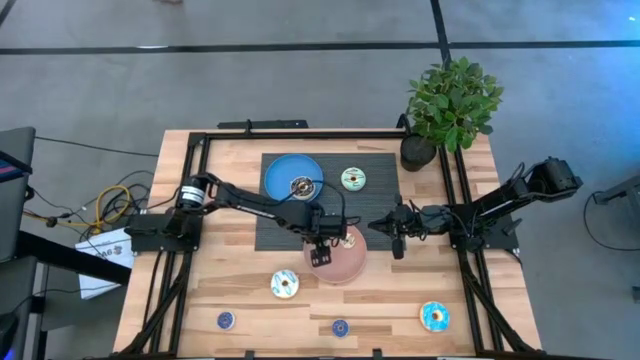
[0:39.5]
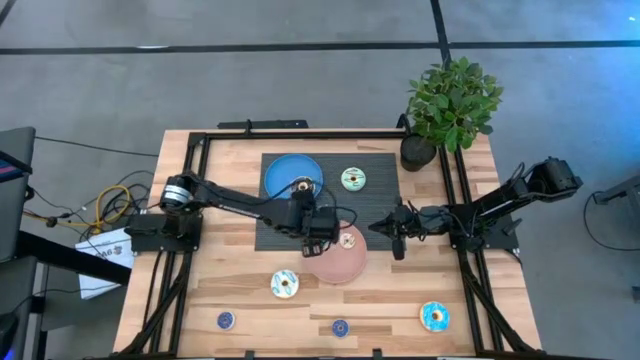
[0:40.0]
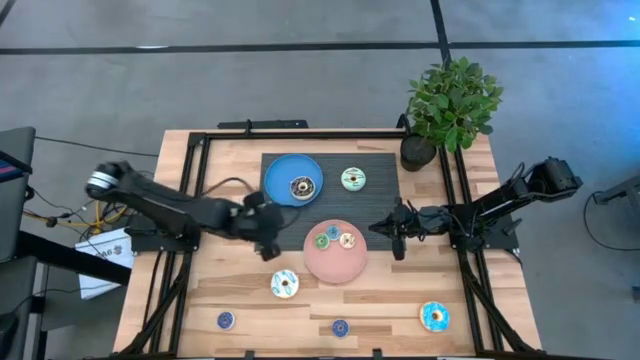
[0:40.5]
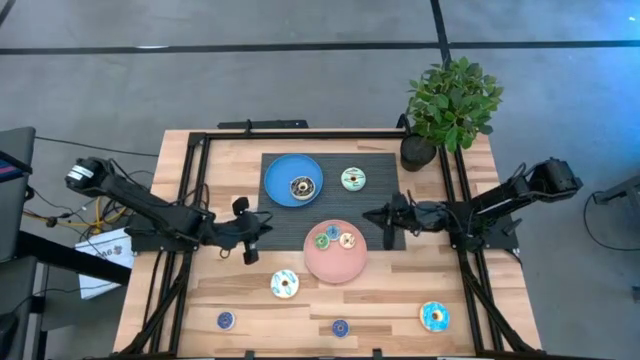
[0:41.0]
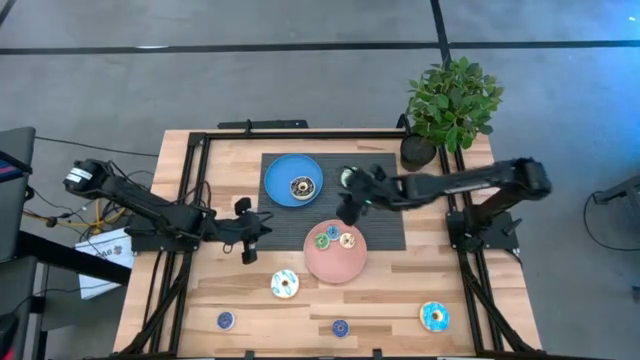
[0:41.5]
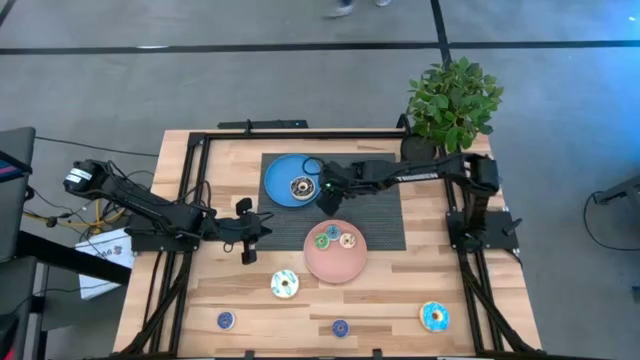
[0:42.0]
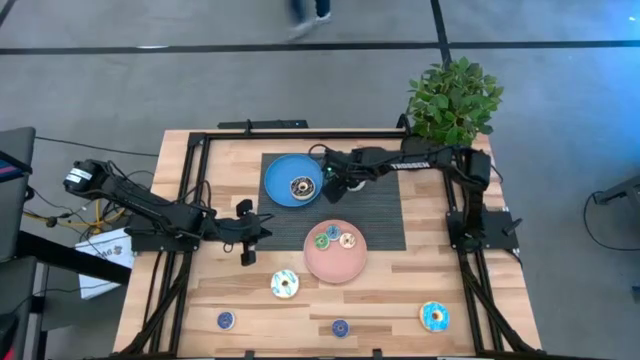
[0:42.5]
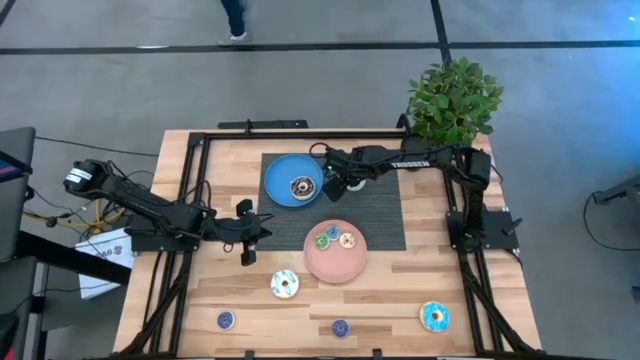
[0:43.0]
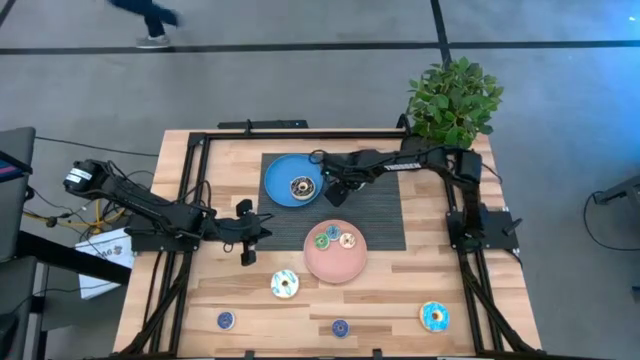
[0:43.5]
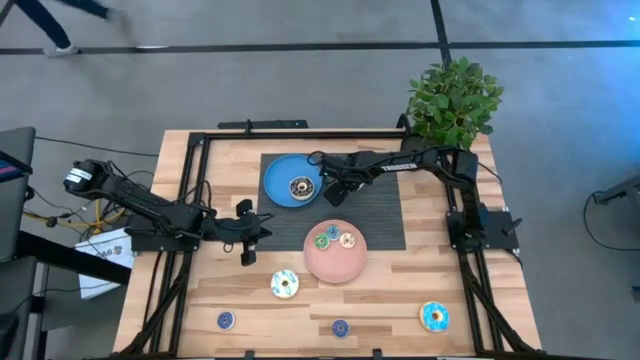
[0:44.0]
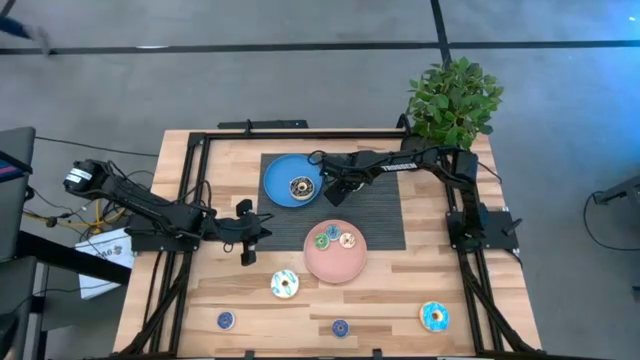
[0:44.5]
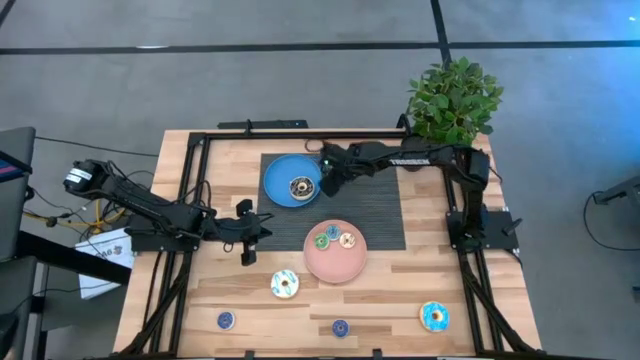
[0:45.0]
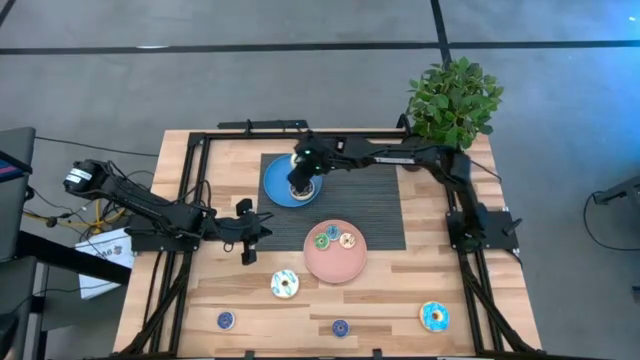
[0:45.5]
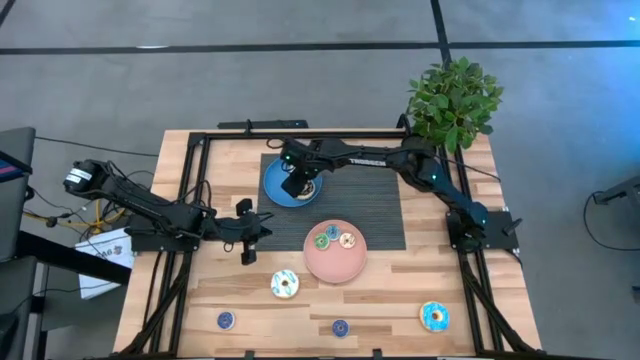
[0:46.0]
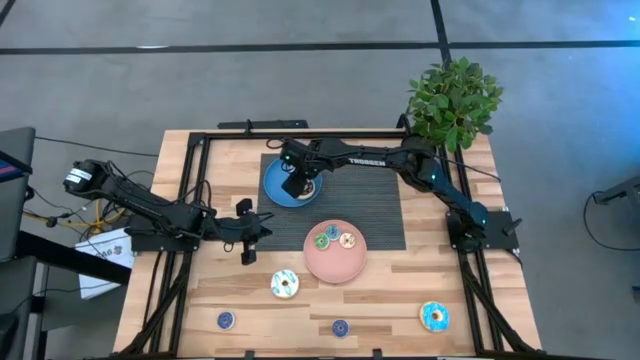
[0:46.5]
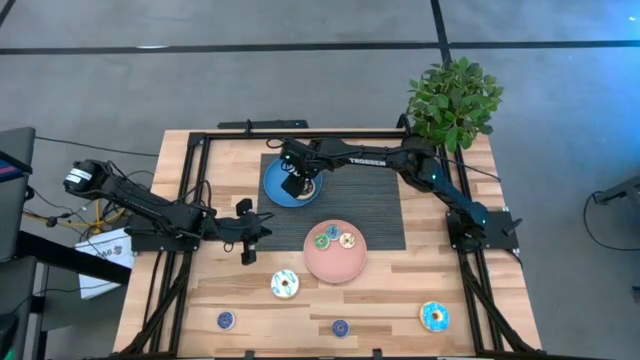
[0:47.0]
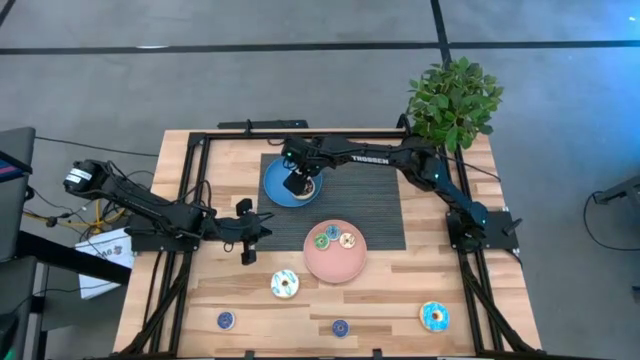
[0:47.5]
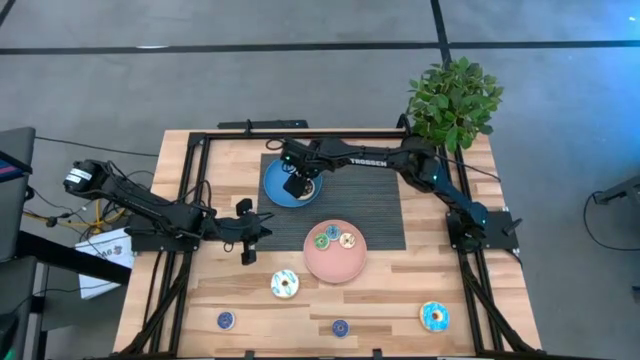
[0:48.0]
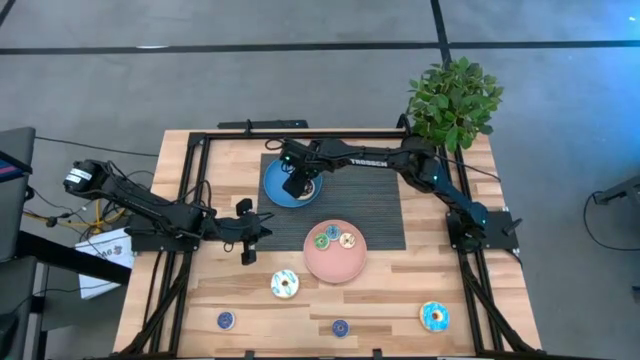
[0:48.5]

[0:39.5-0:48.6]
Task: Pick & Place donuts
Put the large green donut on the blue plate

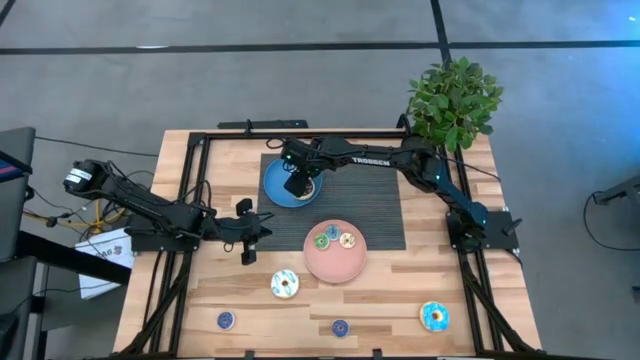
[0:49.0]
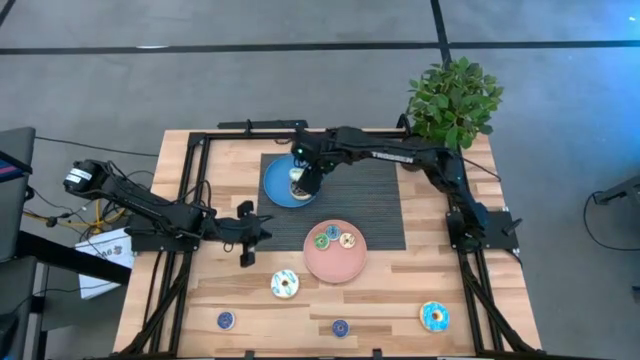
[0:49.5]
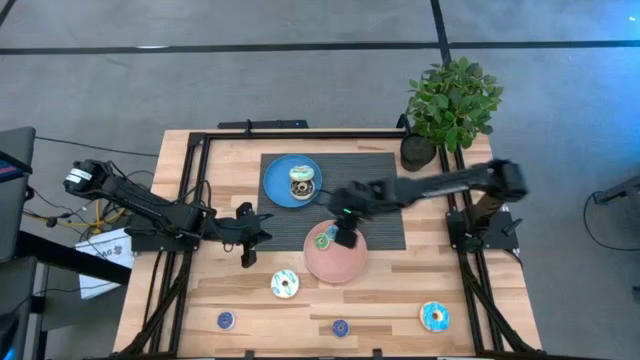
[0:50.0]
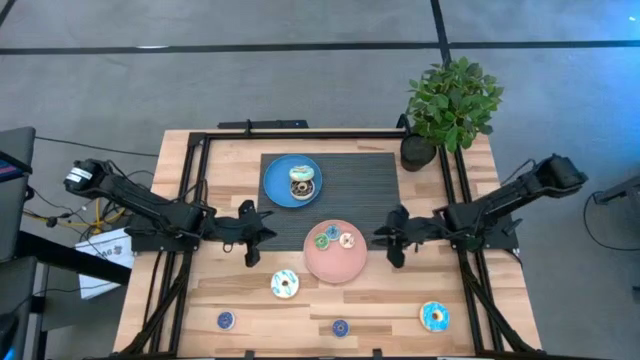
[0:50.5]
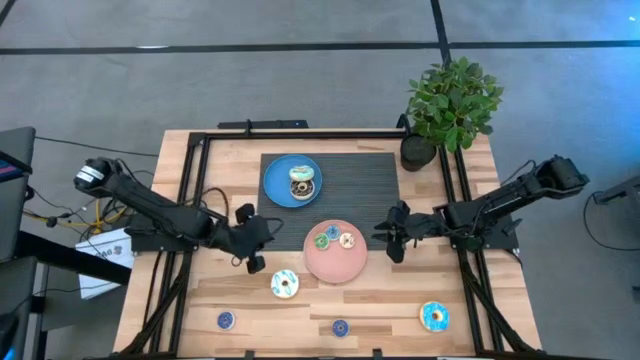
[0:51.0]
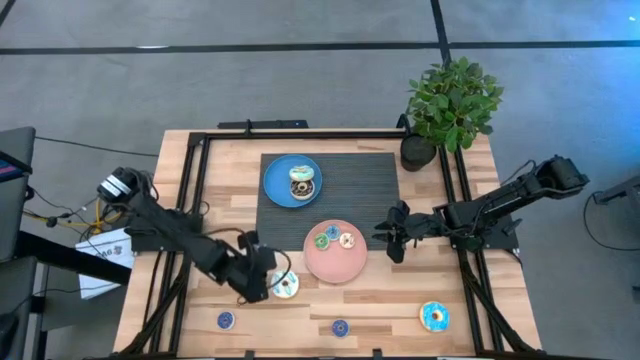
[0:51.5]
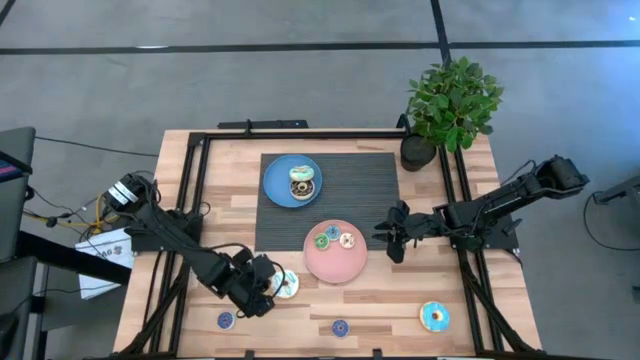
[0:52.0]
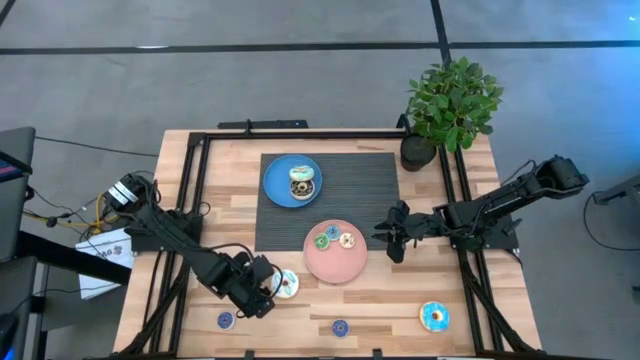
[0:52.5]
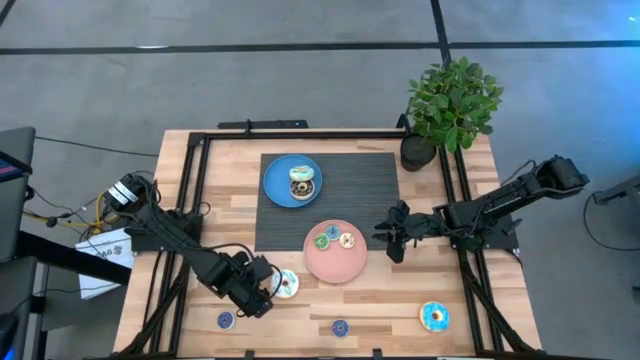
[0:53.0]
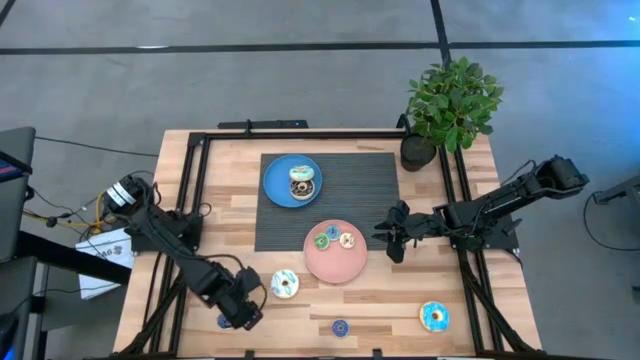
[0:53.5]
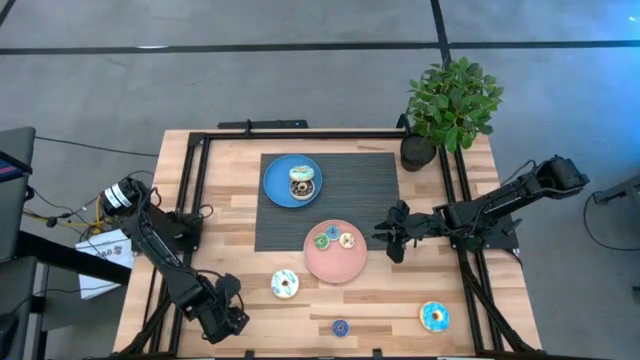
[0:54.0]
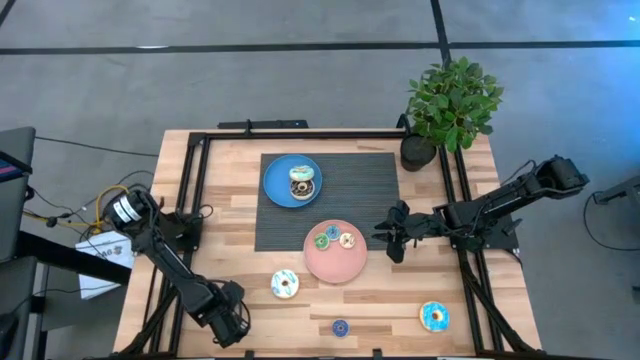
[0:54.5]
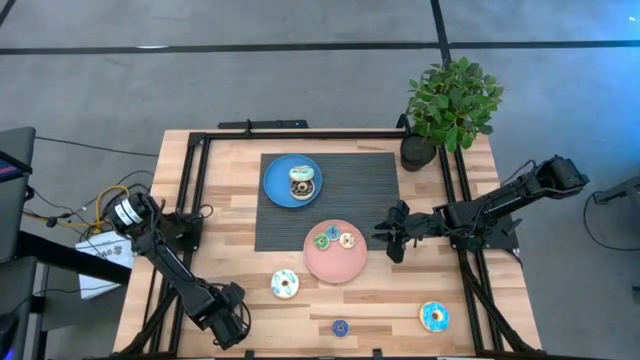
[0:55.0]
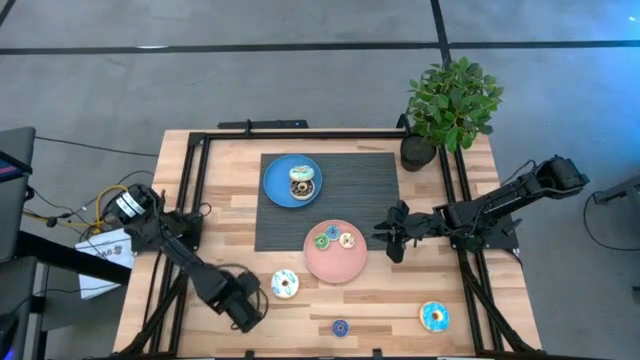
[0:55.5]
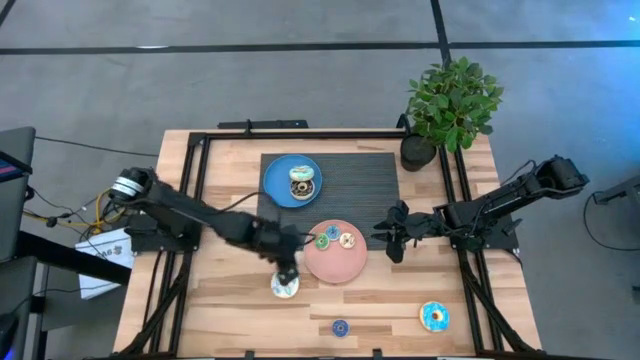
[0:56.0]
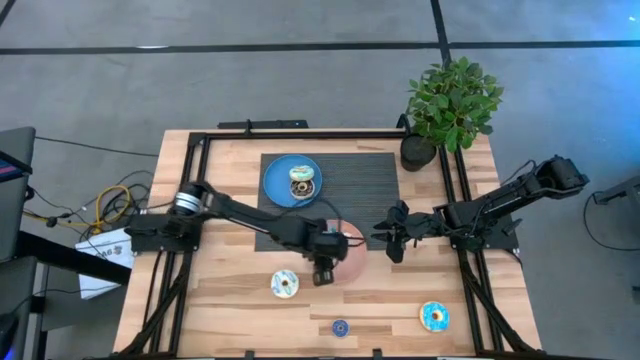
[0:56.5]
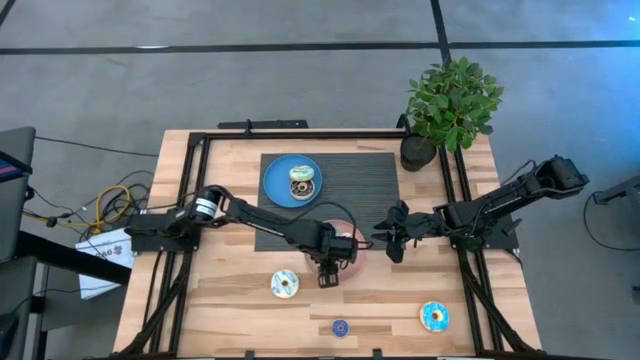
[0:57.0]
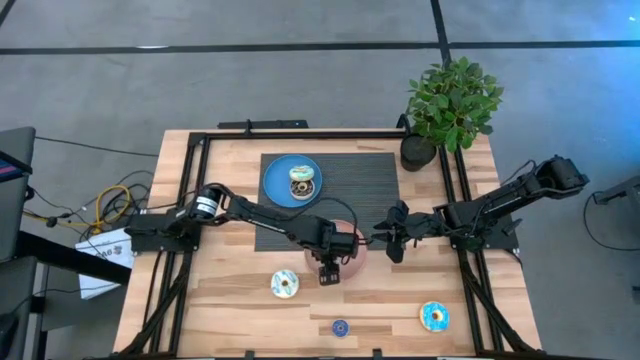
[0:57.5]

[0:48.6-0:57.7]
Put the left small violet donut on the pink plate

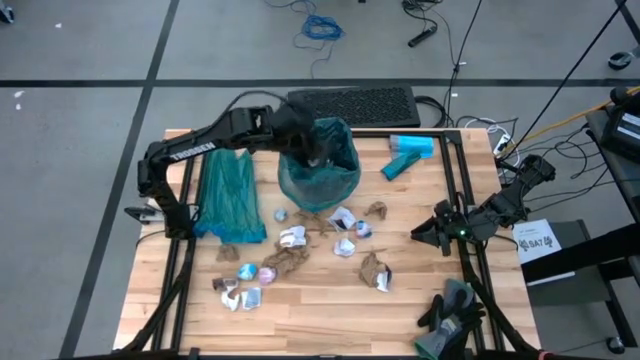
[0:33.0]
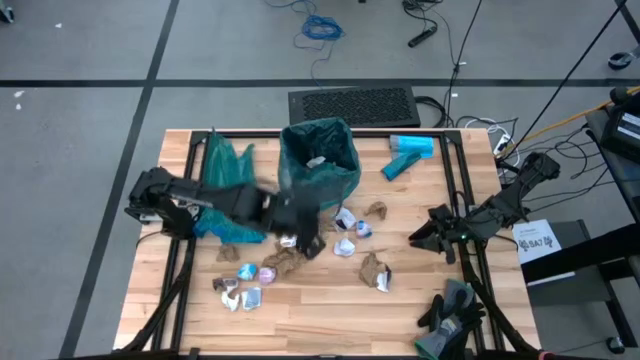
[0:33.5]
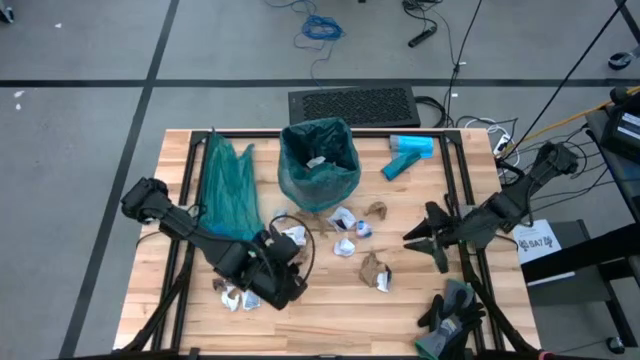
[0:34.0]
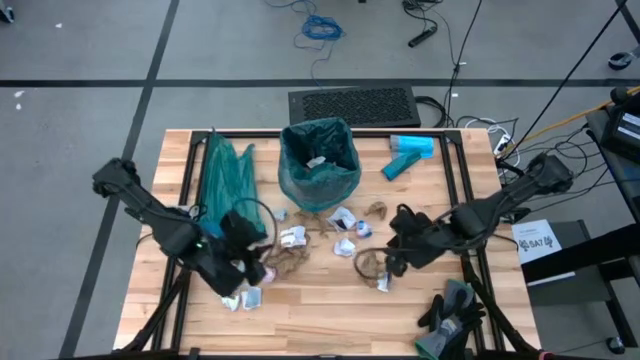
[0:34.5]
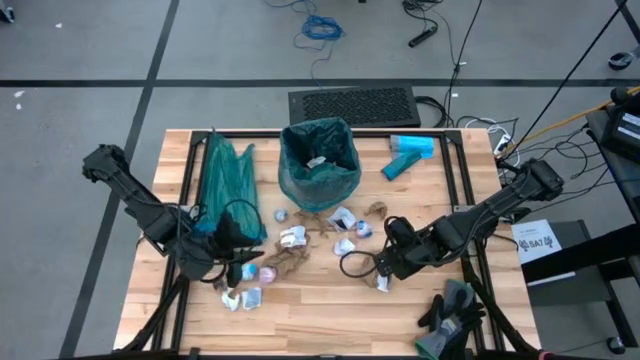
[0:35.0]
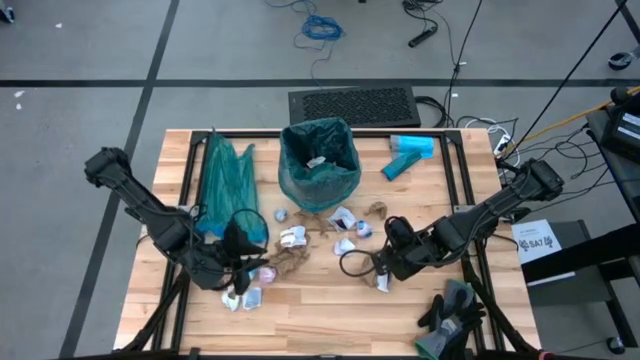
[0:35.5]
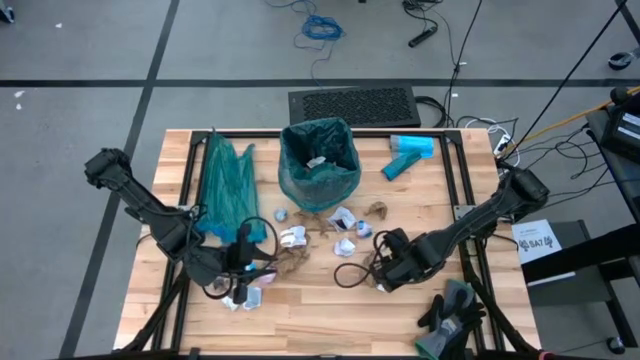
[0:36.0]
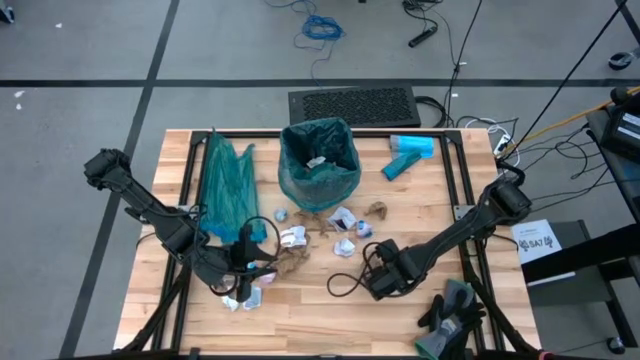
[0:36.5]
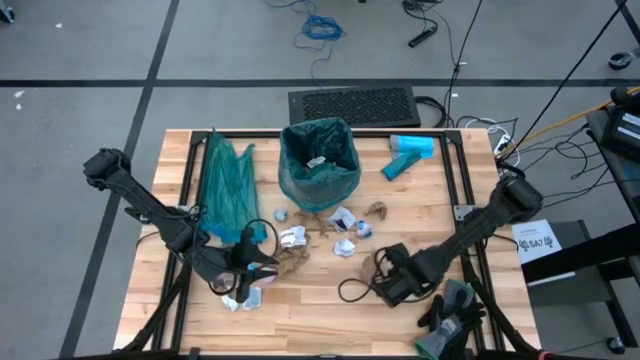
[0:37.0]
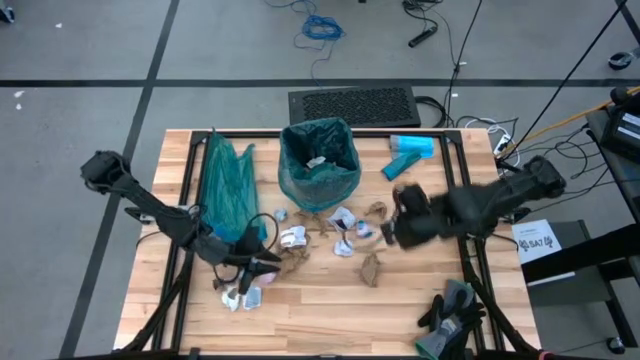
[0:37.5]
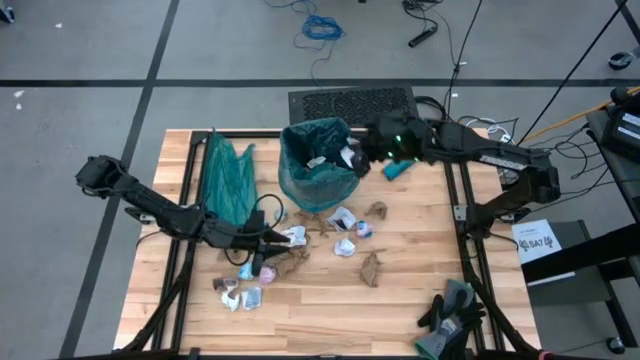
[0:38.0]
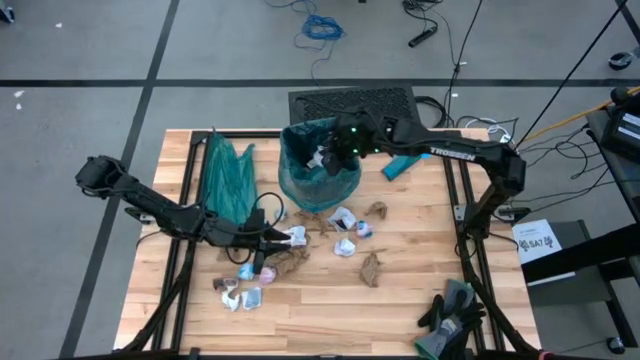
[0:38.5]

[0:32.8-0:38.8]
Task: place trash/remove bag and relplace
Put the white paper into the blue trash bag inside the black trash bin
